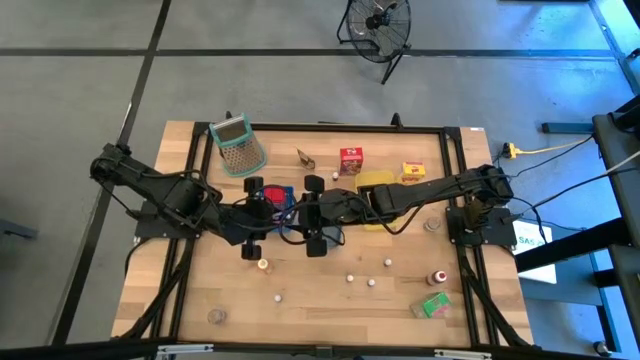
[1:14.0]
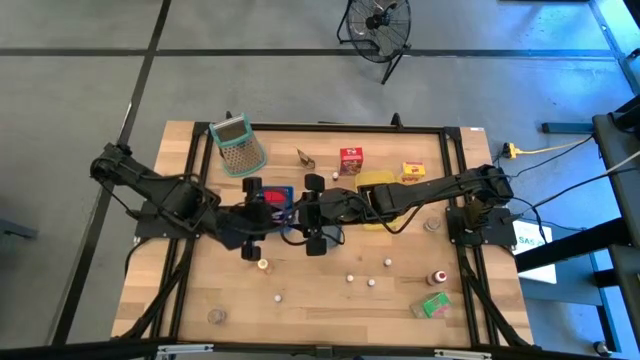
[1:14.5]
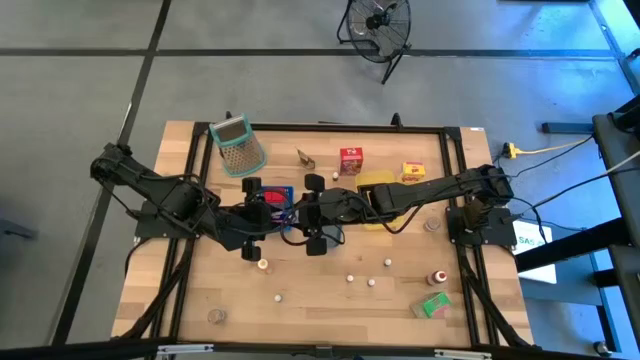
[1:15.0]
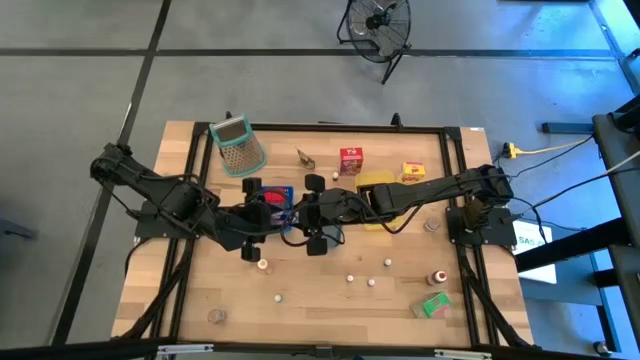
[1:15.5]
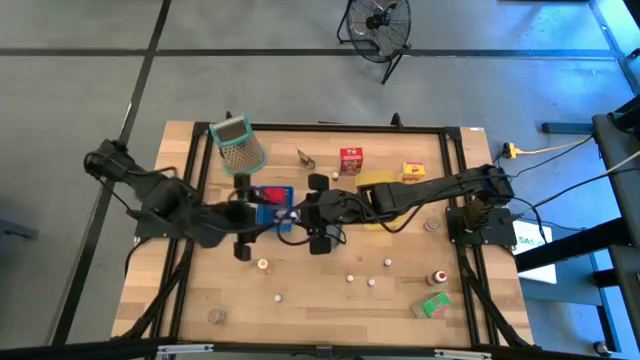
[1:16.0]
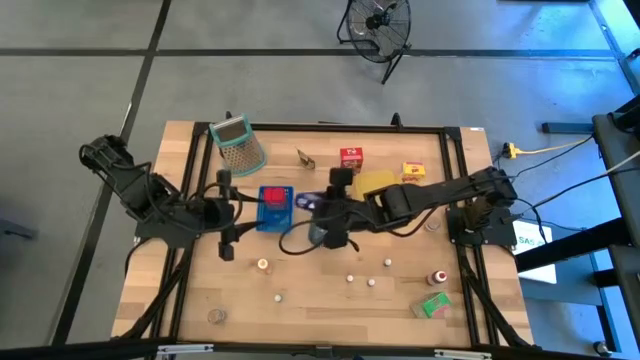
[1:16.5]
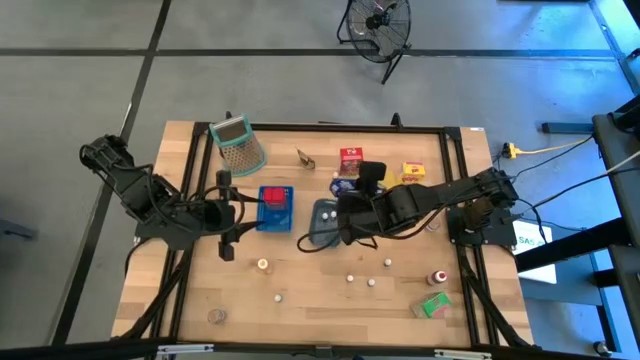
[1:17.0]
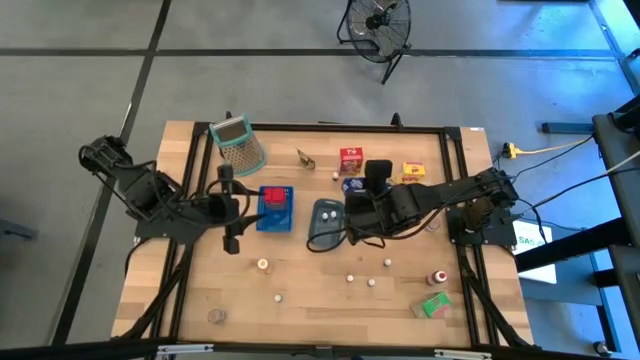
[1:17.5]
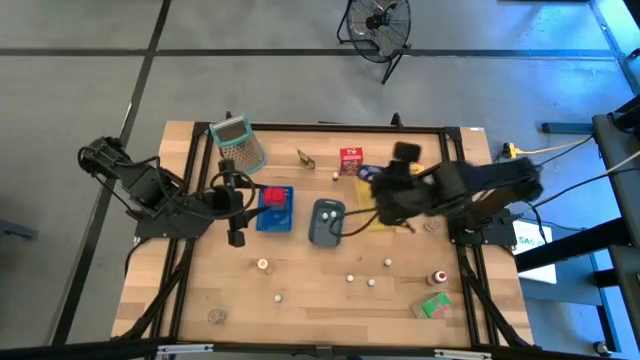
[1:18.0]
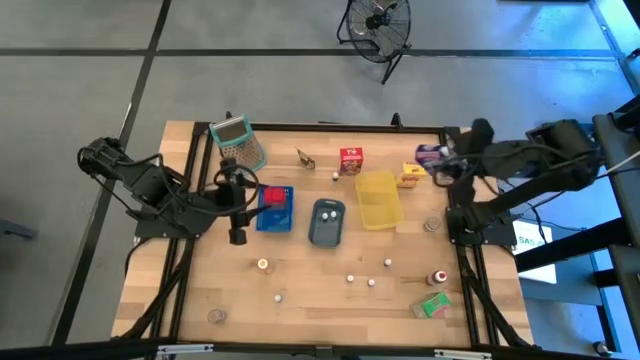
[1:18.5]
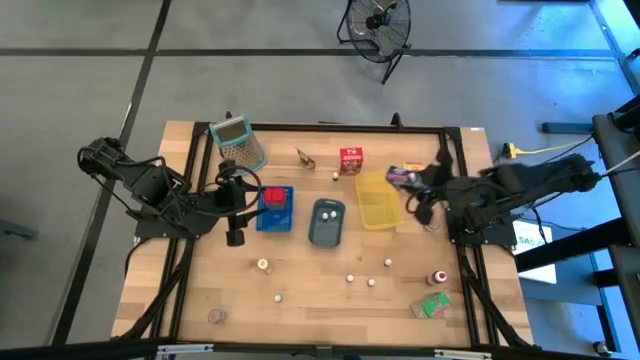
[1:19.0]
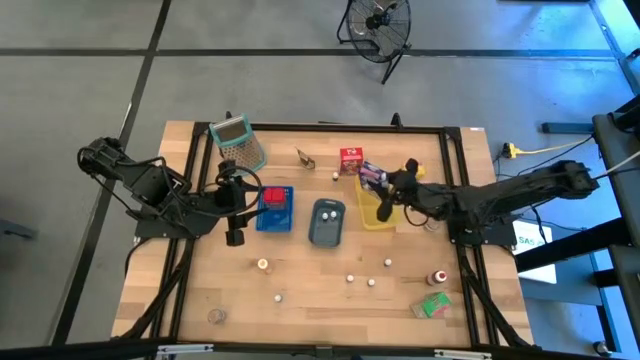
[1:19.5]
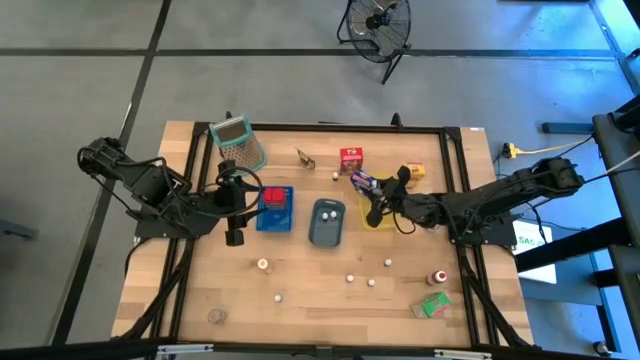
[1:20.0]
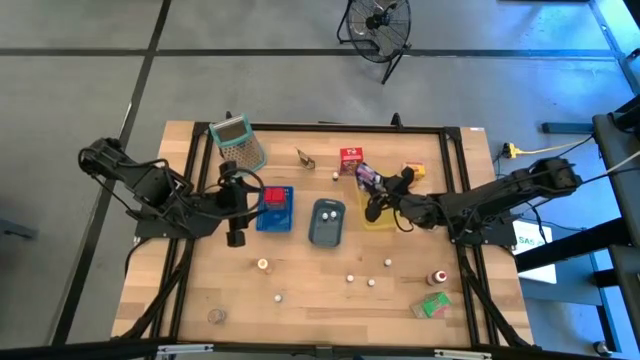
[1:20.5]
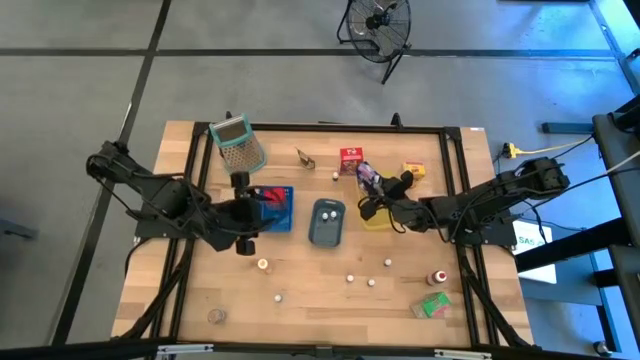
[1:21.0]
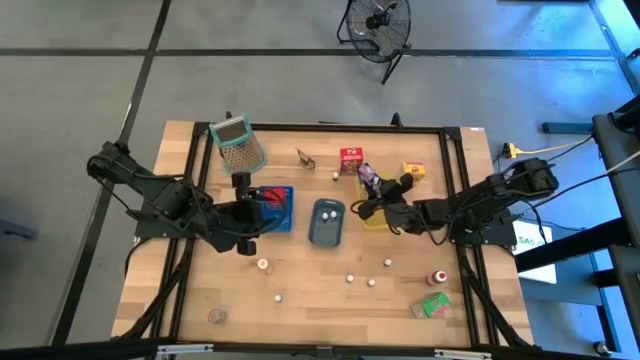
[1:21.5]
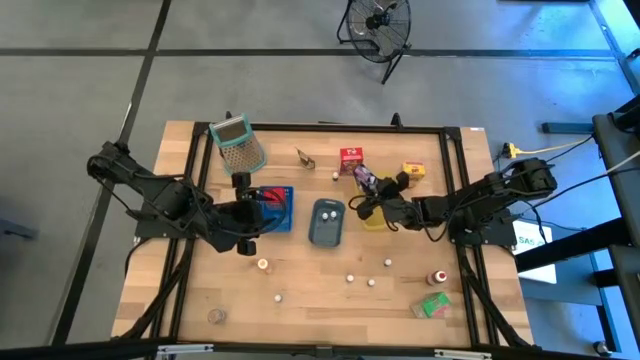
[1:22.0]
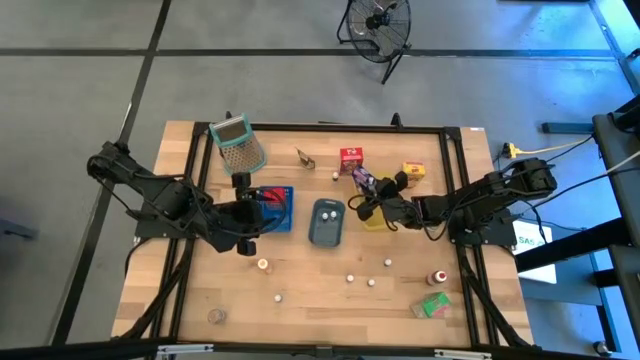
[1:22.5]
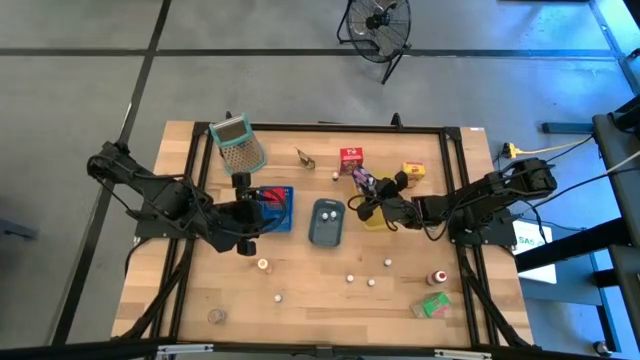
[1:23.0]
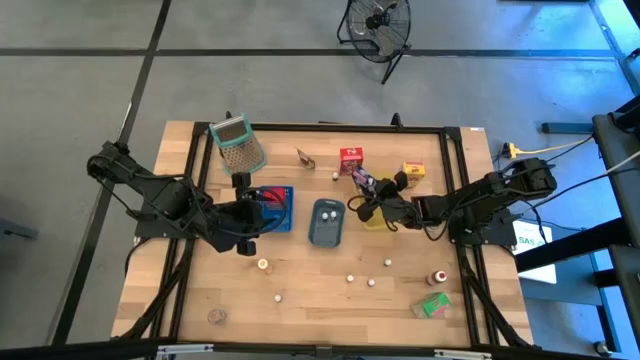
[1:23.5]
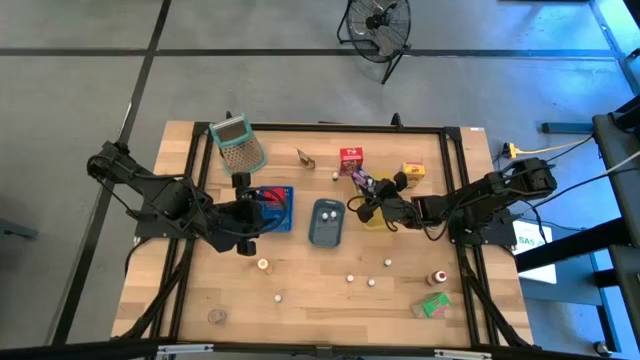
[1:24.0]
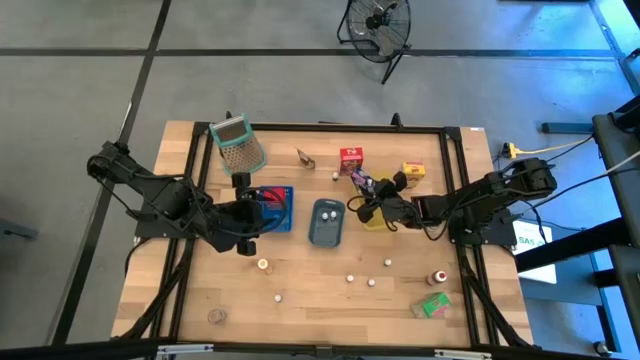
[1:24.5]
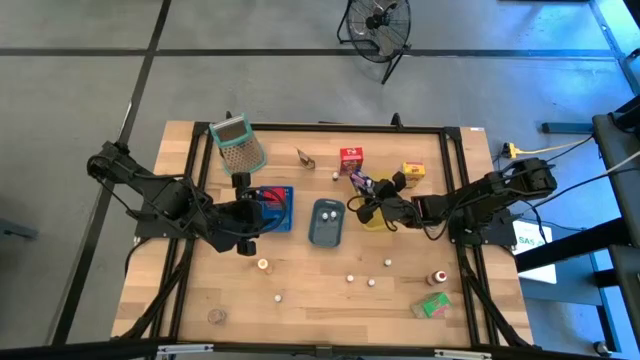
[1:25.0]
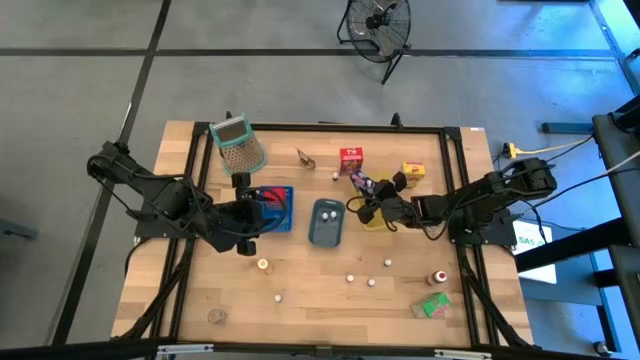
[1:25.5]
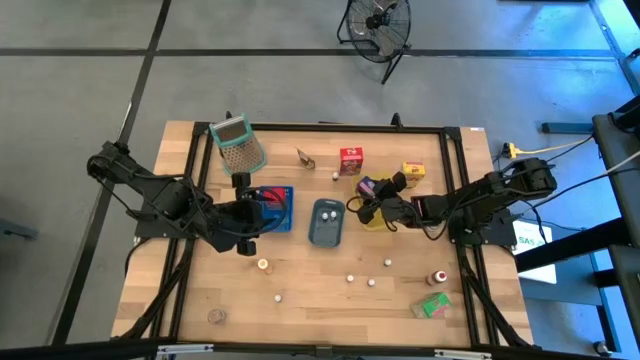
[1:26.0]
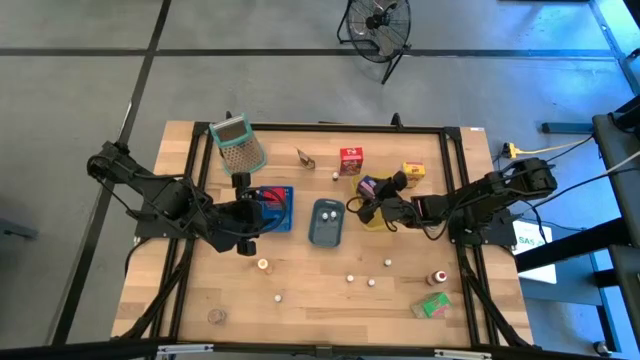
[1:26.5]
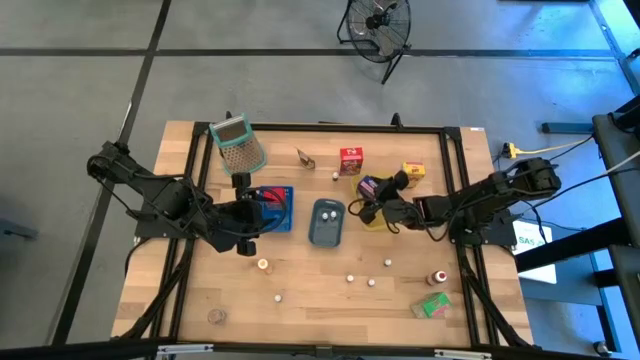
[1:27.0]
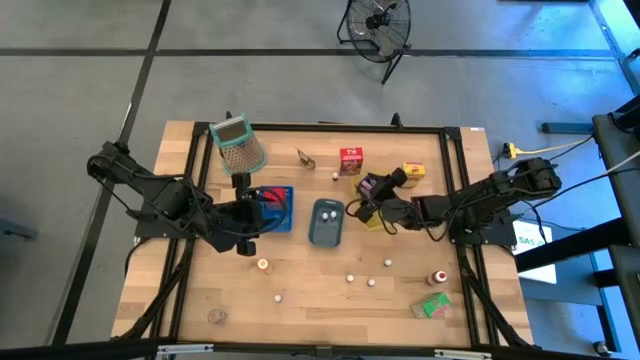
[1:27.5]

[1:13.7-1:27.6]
Task: Pick & Place Kitchen Items
Put the blue cereal box into the yellow bin

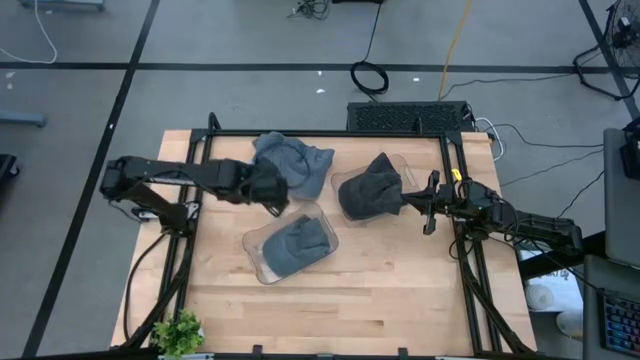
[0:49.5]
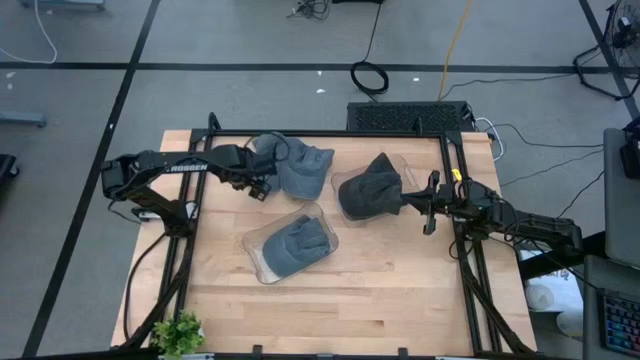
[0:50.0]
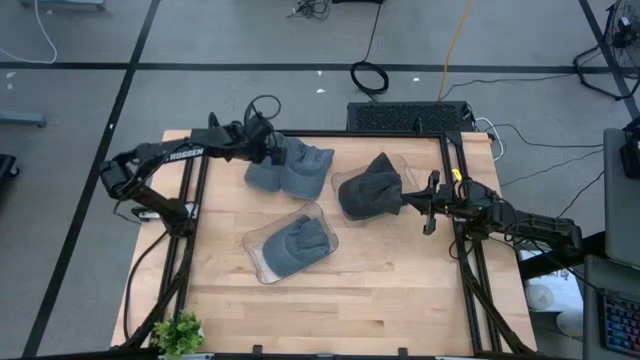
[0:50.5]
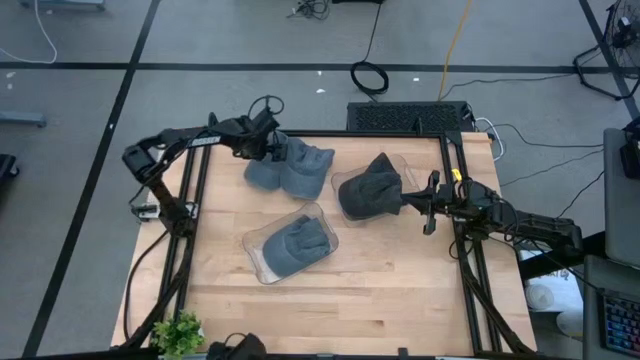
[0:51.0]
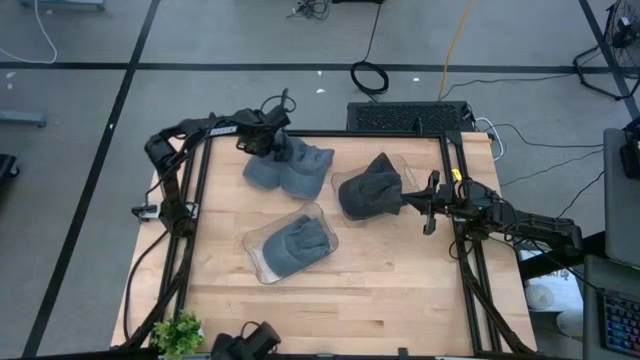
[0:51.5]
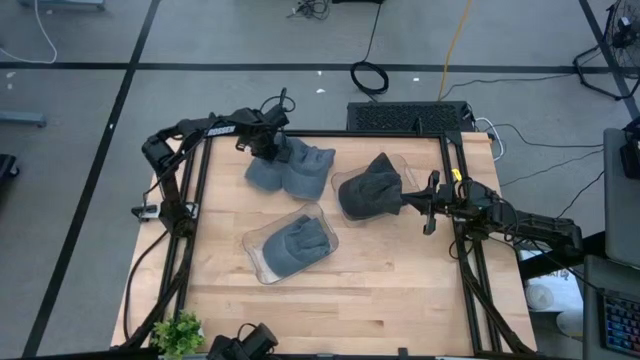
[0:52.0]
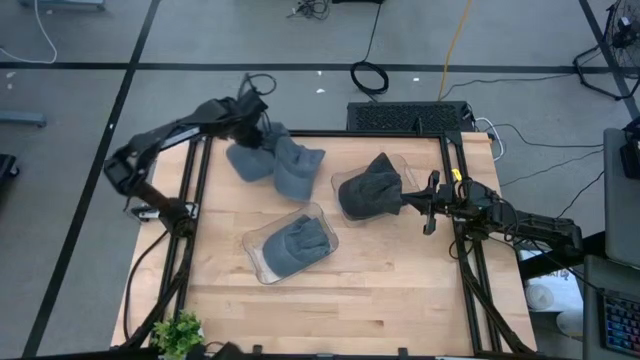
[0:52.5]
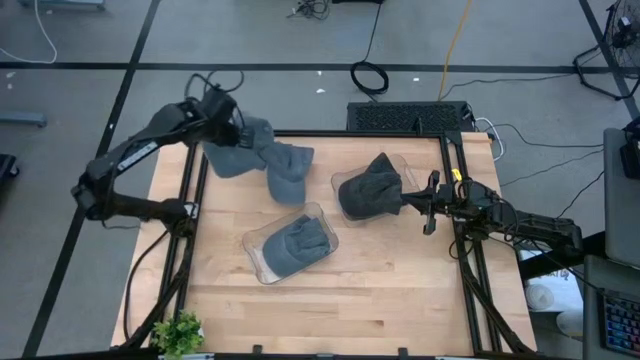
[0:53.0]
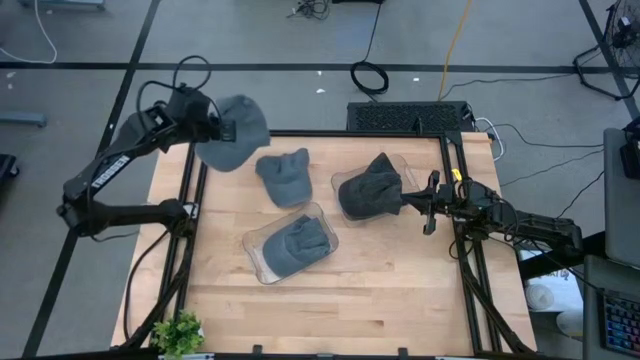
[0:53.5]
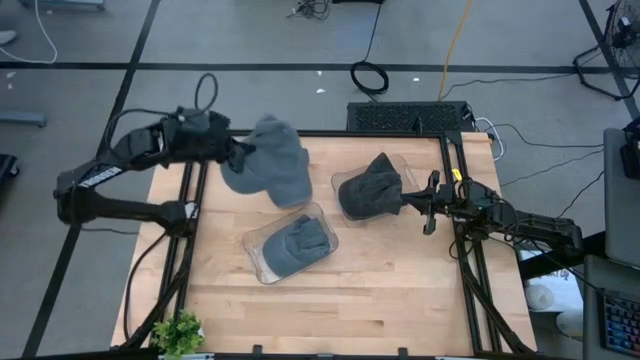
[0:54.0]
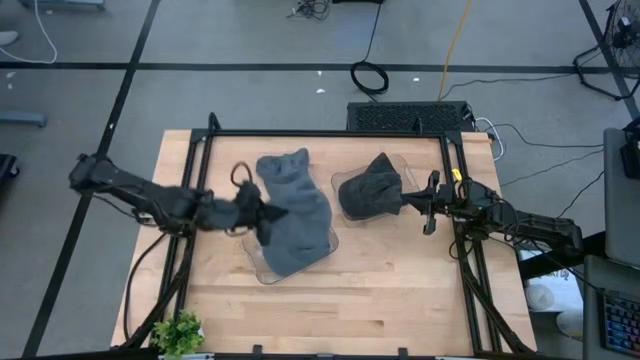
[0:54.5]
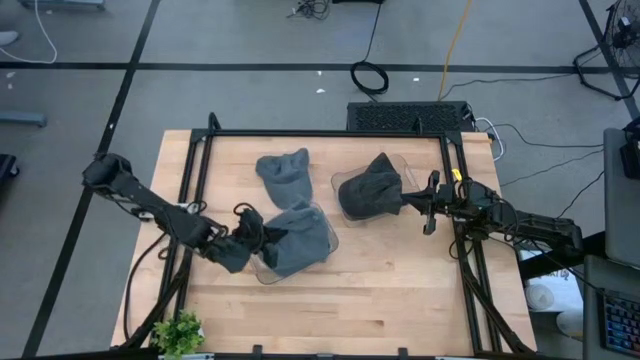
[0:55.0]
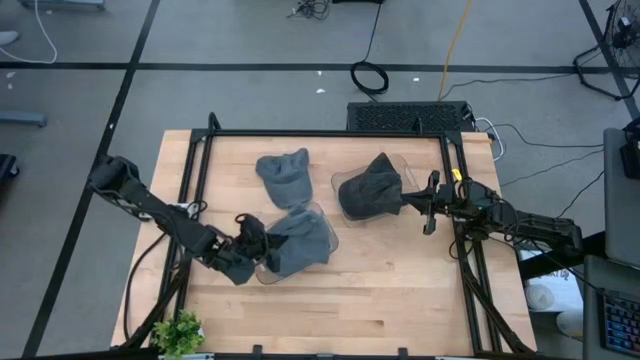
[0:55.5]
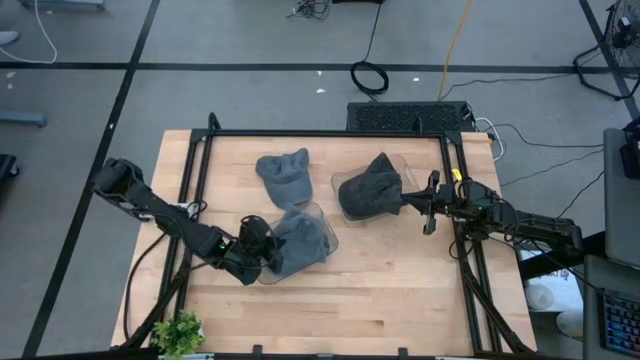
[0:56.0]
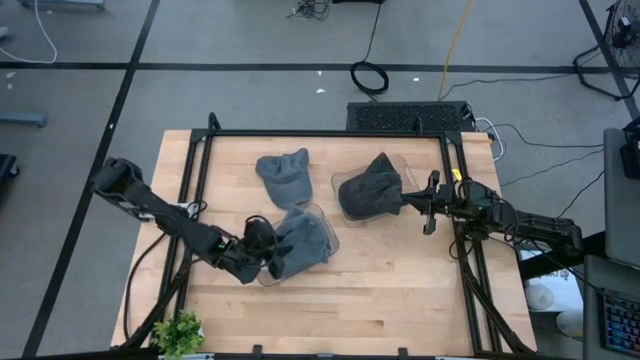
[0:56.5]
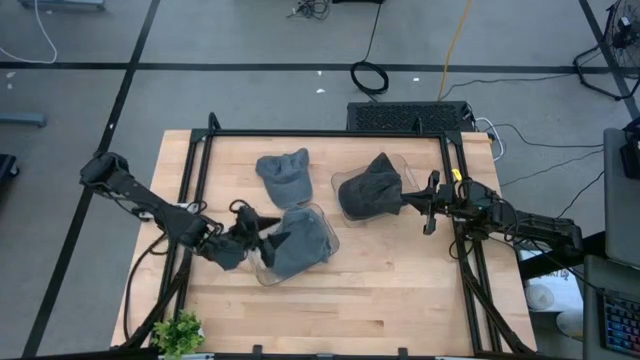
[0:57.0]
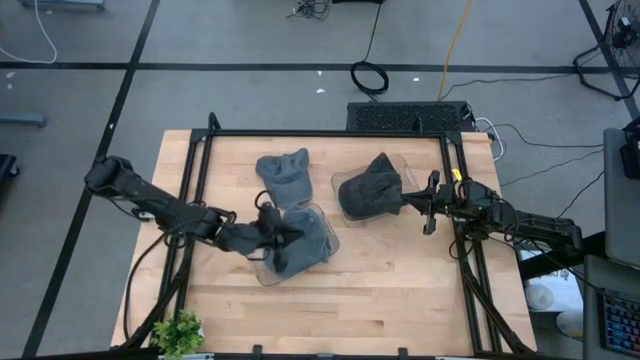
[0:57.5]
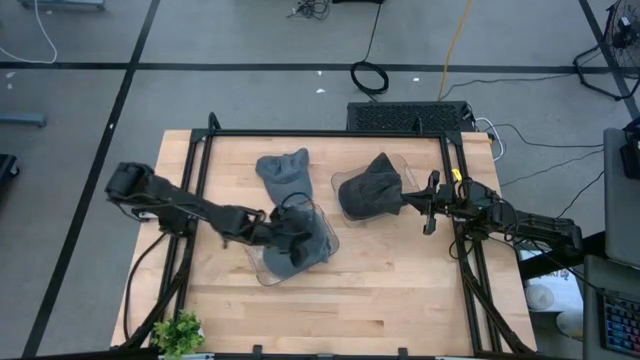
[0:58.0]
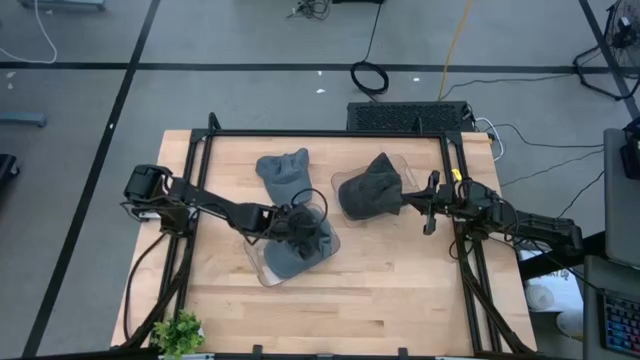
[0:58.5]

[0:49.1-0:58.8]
Task: Pick & Place hat
Put the left blue cap into the bottom transparent bin
